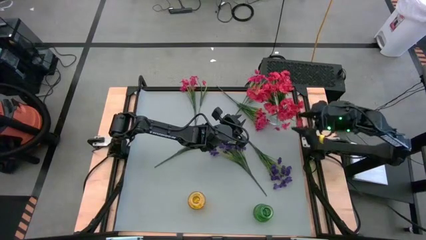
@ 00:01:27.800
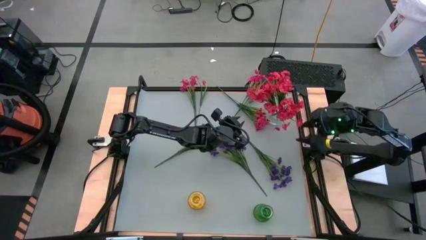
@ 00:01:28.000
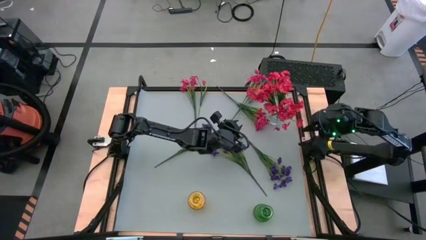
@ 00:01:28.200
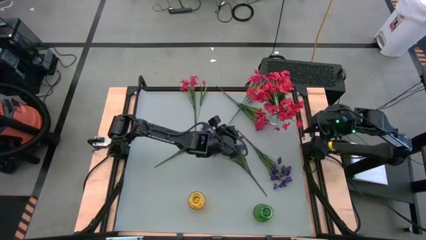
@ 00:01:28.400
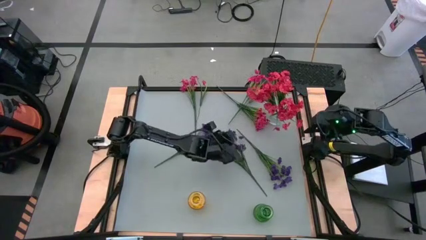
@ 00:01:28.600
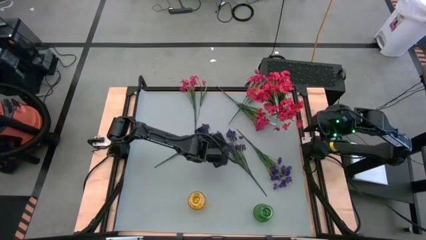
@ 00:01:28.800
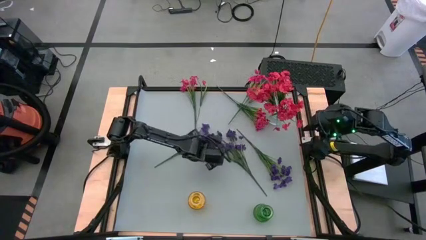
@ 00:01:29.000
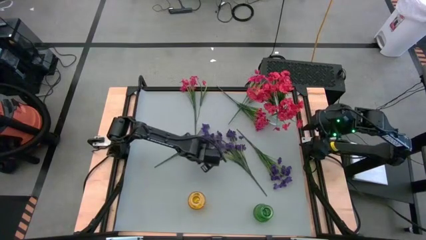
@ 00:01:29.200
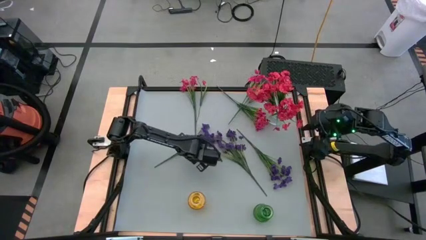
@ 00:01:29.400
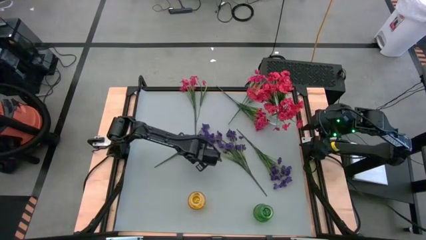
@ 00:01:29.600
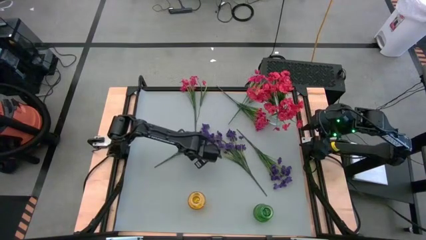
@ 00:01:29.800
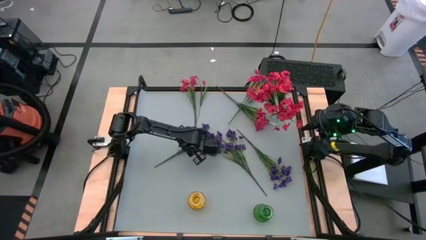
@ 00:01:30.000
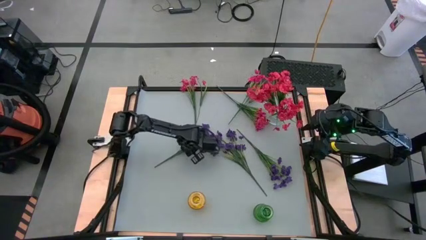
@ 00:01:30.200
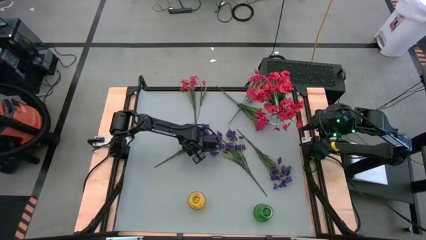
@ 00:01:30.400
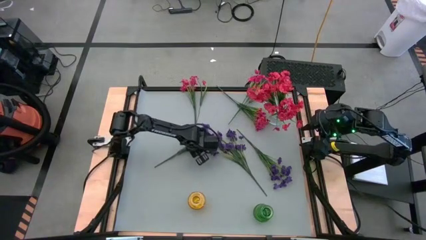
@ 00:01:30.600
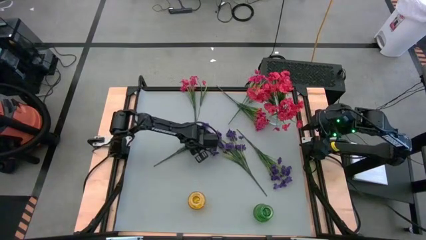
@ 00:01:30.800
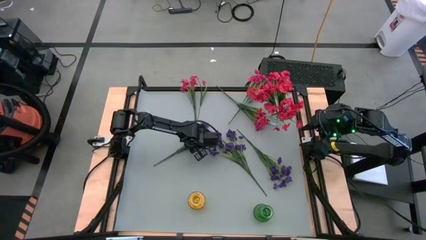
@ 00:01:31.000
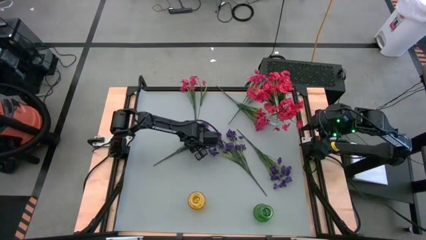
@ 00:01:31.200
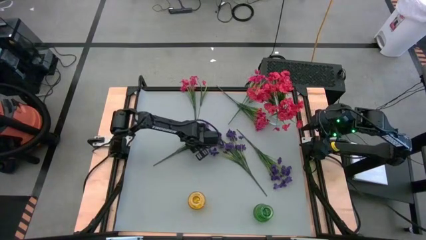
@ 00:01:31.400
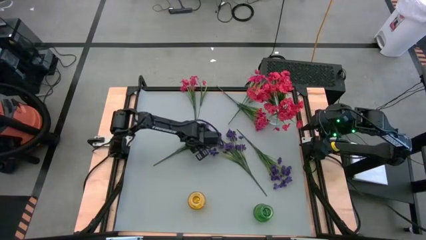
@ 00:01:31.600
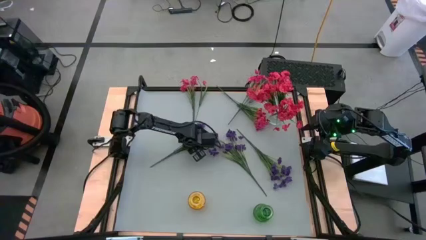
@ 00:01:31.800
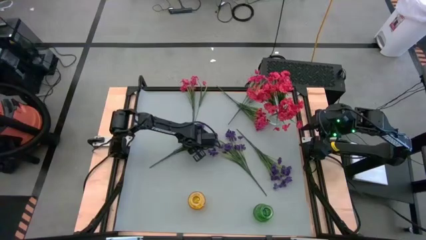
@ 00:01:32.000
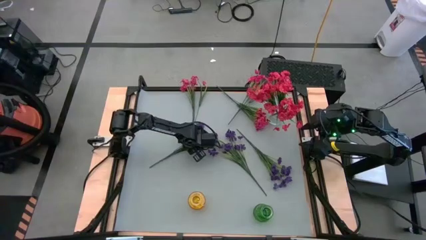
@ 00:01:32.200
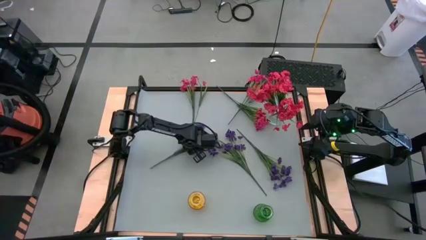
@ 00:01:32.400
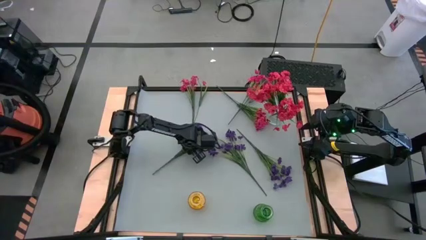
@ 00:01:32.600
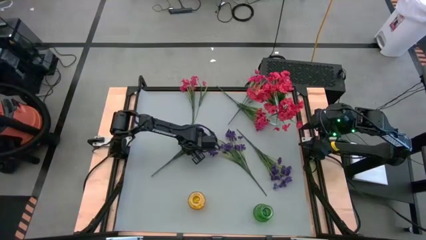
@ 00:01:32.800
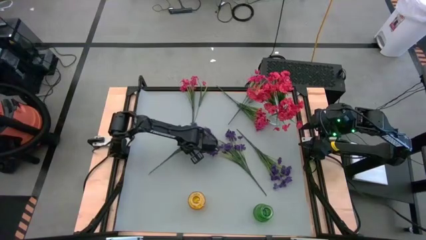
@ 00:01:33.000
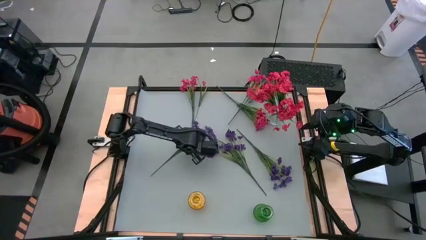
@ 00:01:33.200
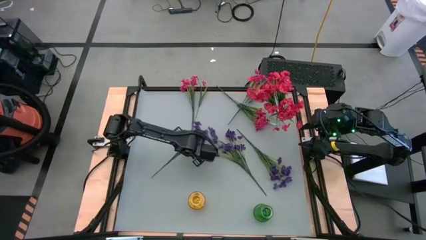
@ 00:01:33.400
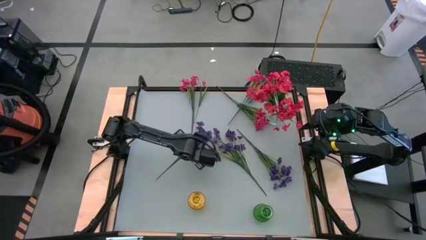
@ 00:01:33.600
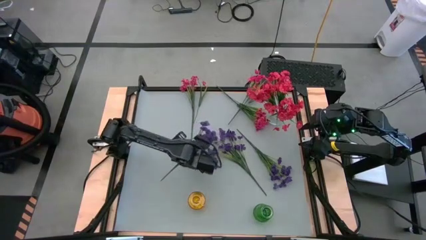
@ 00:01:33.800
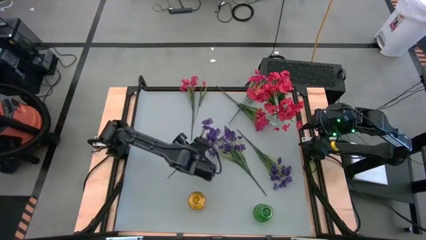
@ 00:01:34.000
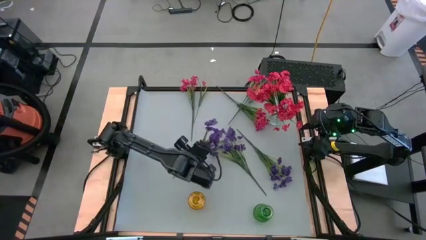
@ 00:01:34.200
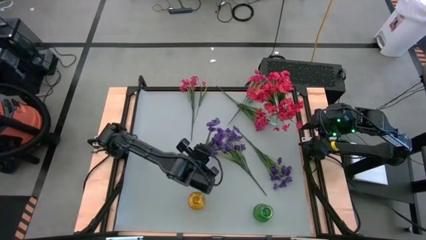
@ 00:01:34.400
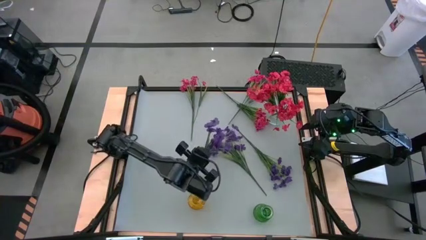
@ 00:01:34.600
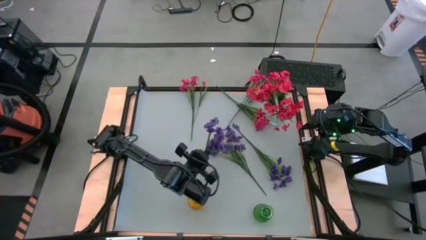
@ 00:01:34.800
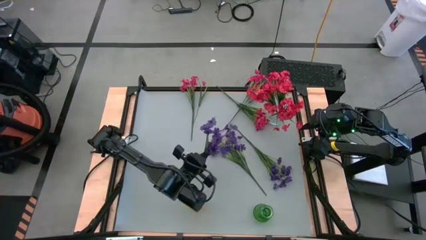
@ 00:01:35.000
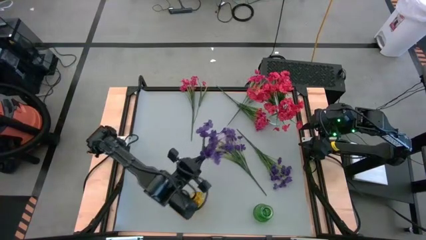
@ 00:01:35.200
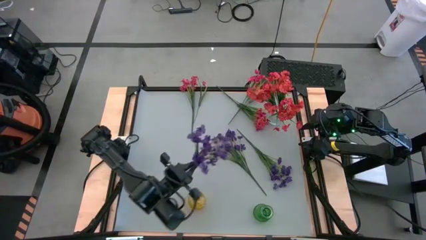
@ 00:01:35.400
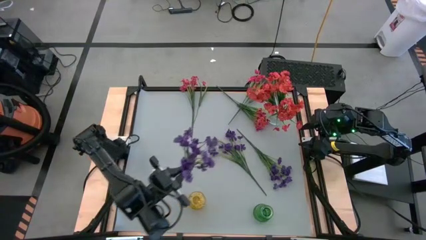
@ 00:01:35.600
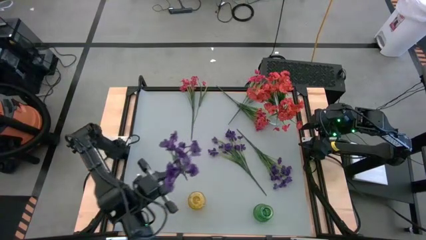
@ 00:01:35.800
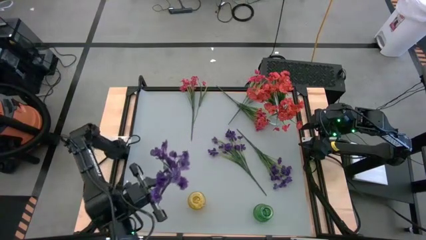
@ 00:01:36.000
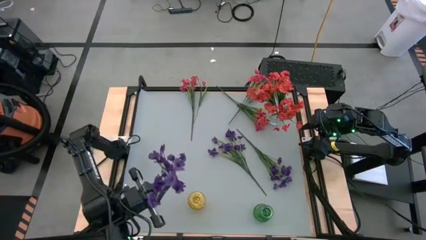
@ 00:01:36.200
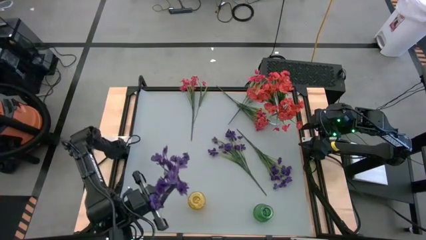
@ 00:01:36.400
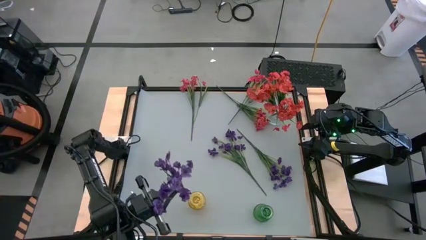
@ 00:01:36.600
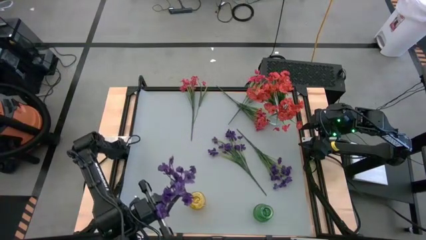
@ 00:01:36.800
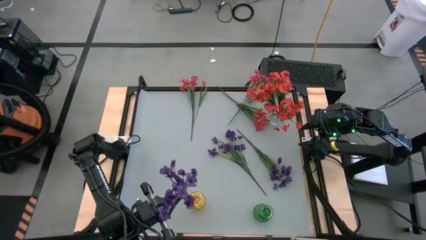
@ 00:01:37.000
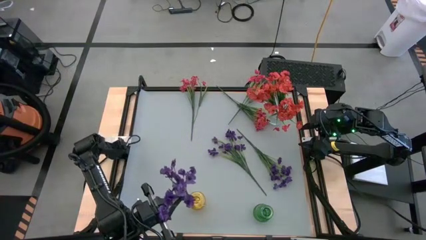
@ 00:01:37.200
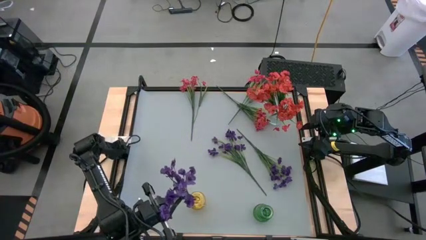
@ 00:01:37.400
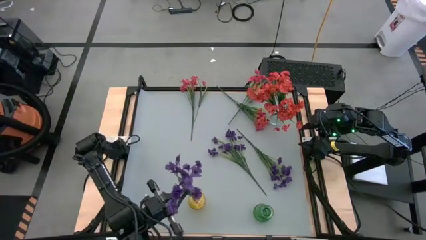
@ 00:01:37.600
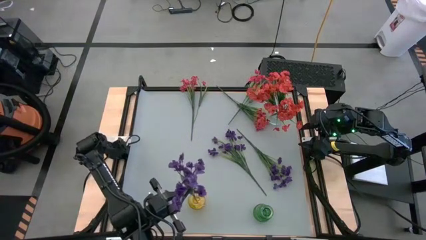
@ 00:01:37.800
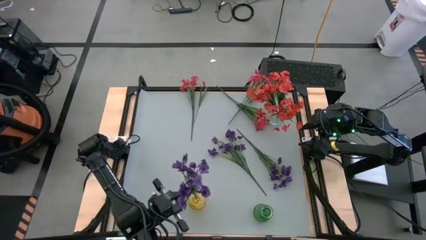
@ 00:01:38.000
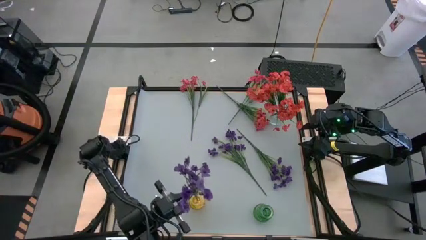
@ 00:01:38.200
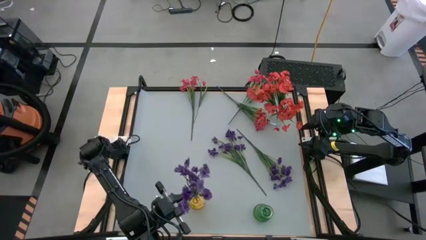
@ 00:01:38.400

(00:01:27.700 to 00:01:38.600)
Task: Sort flowers into vase by color
Put the left purple flower into the yellow transparent vase

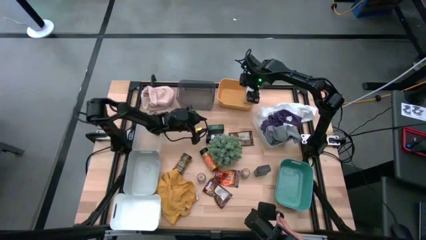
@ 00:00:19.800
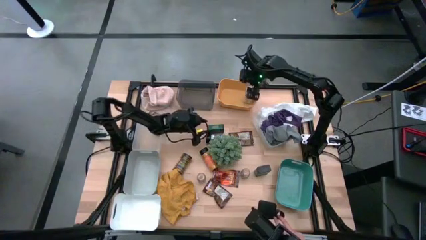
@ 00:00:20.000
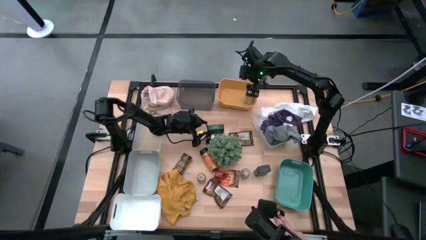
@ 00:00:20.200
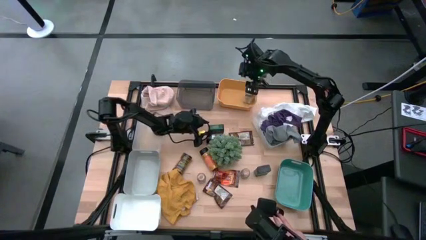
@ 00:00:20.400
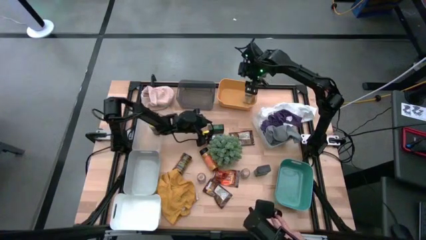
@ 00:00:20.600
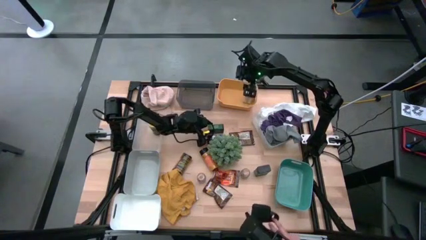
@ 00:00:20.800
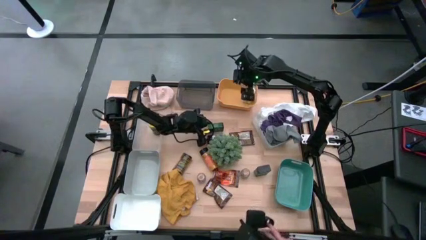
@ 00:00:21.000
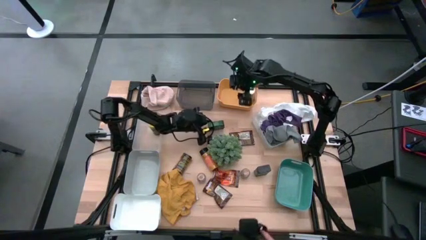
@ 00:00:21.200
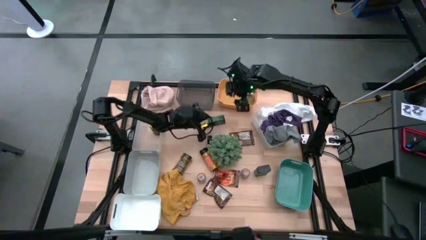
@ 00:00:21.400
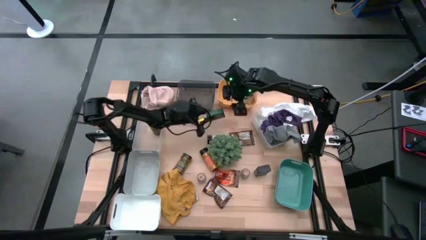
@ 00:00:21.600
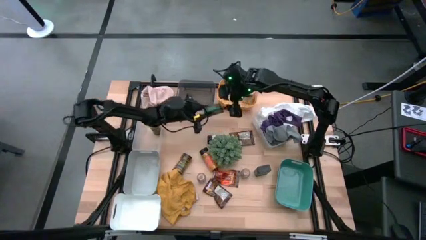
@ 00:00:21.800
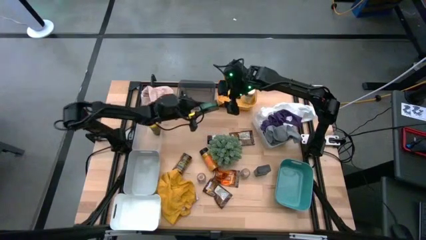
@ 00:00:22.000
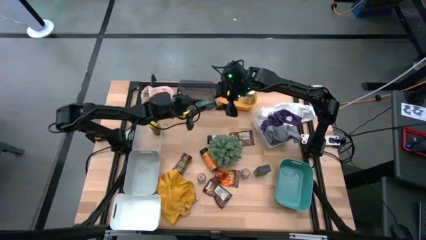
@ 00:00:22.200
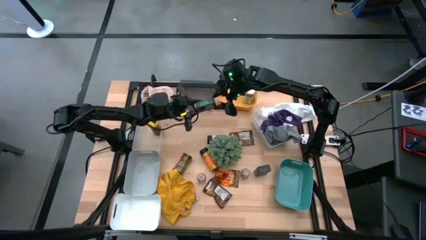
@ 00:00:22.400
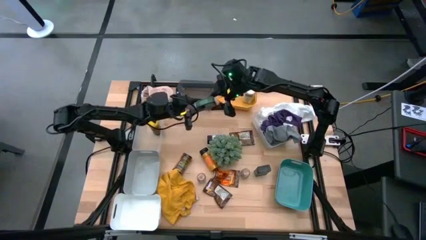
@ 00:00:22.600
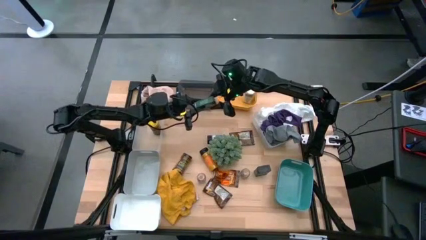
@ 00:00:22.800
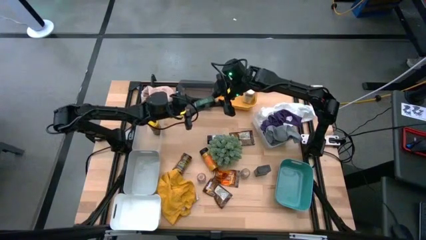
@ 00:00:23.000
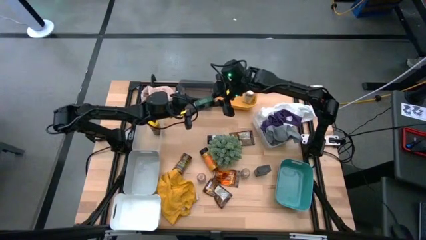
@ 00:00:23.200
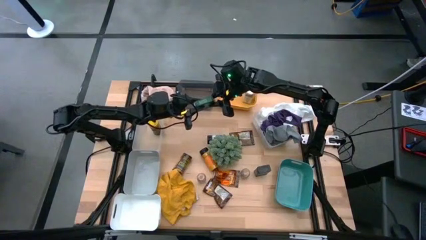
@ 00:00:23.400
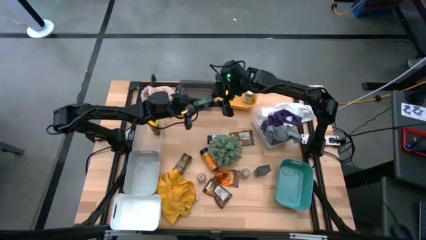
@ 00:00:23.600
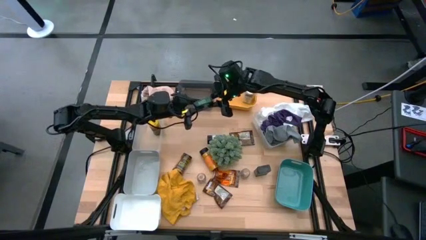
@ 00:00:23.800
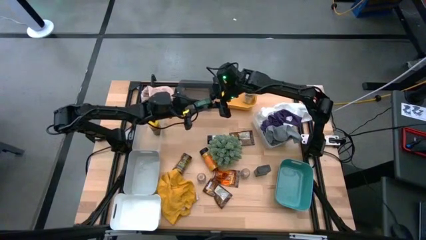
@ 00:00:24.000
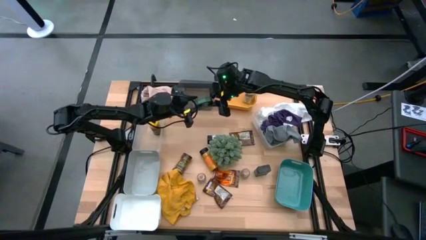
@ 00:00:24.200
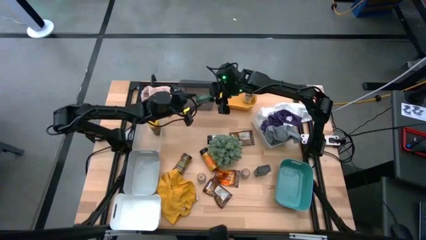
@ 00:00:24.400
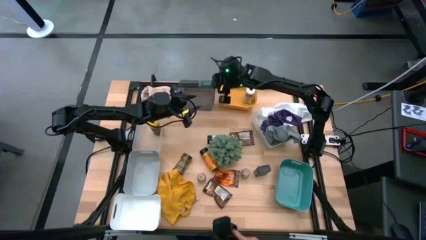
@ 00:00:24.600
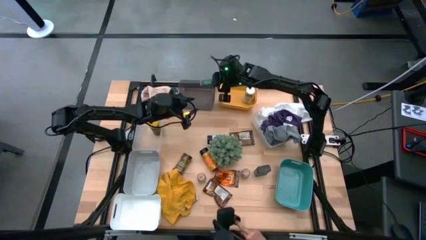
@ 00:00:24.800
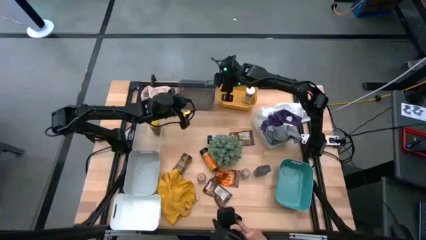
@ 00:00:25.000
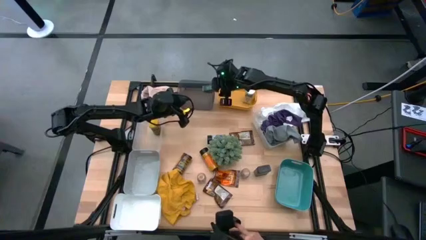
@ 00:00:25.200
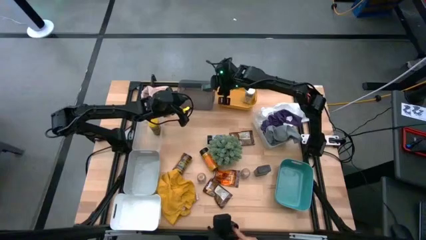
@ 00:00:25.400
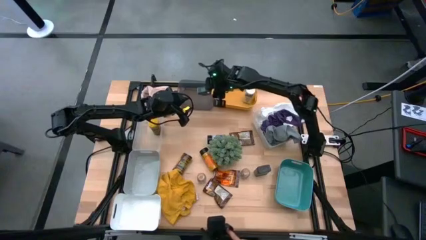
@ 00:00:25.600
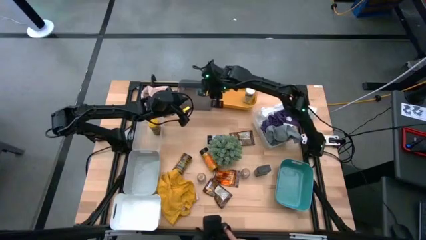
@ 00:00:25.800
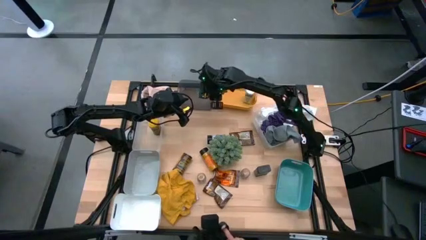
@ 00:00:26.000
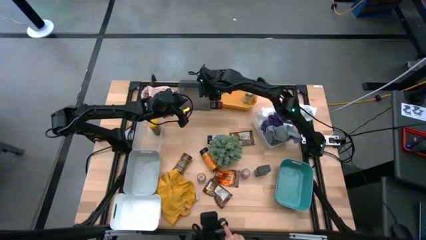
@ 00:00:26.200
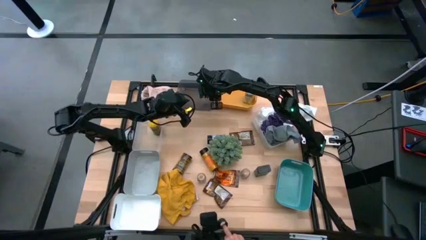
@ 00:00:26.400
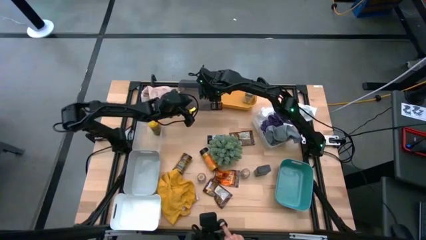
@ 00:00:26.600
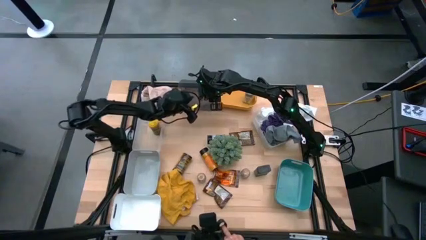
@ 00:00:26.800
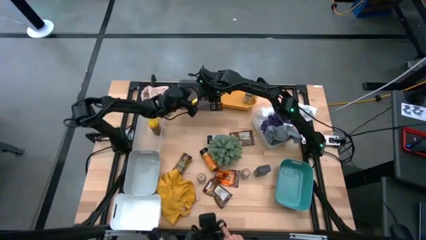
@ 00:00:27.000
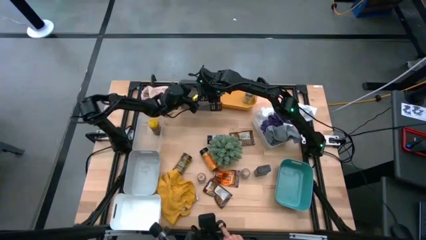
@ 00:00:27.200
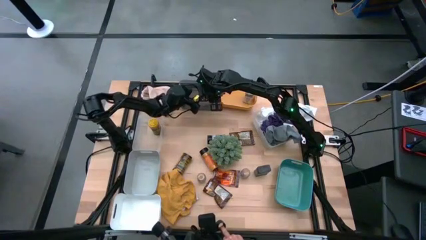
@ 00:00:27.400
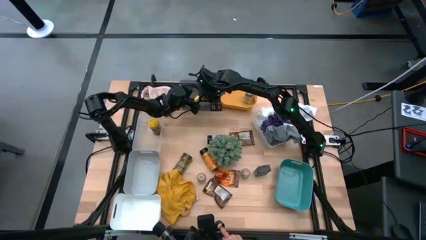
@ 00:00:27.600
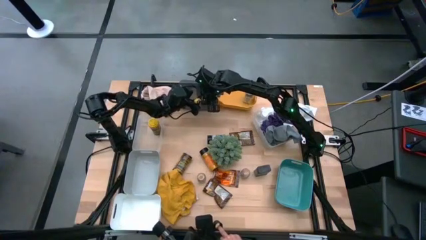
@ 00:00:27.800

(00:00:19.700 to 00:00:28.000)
Task: Sort spices by type
Put the green spice can into the black transparent bin
